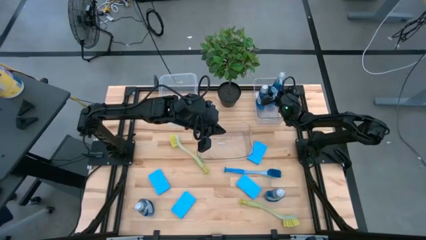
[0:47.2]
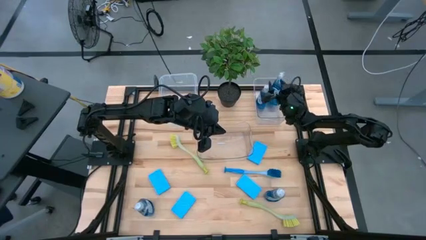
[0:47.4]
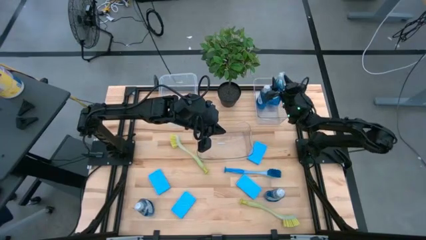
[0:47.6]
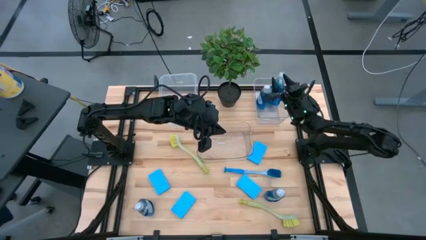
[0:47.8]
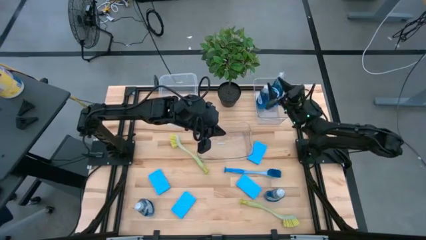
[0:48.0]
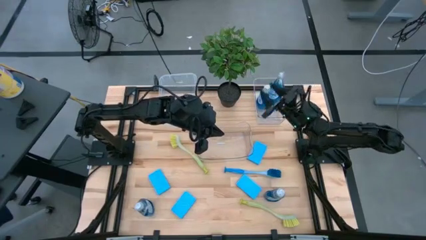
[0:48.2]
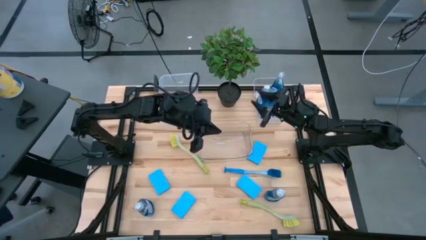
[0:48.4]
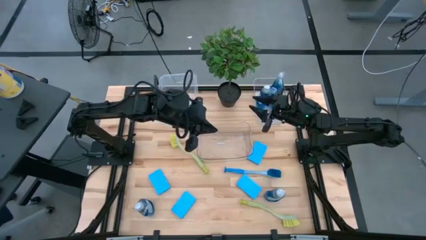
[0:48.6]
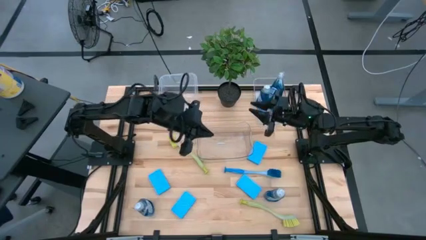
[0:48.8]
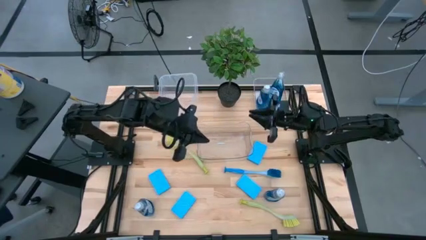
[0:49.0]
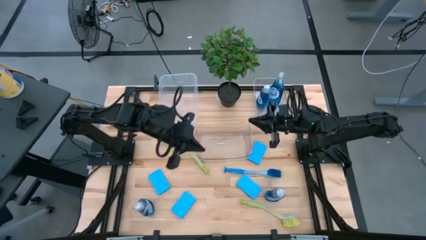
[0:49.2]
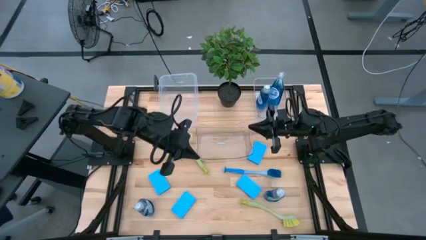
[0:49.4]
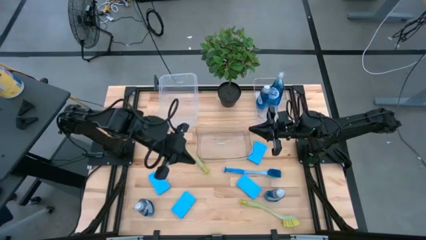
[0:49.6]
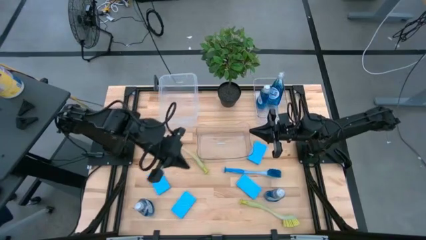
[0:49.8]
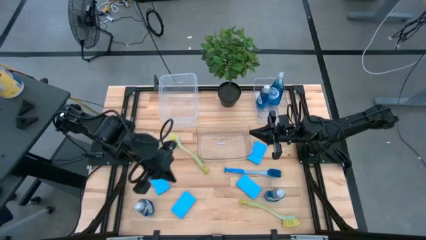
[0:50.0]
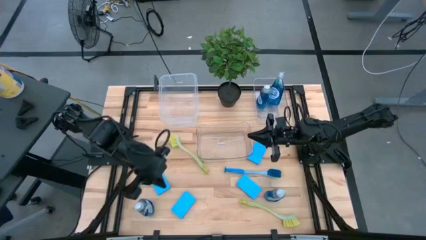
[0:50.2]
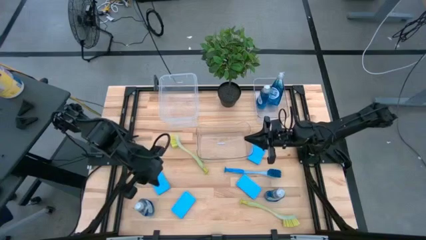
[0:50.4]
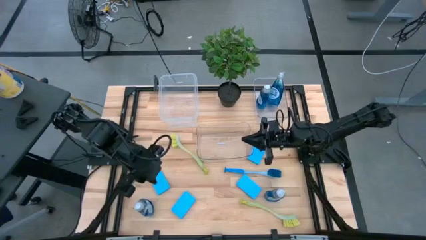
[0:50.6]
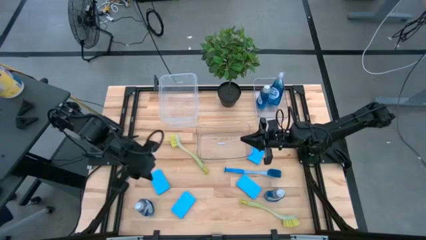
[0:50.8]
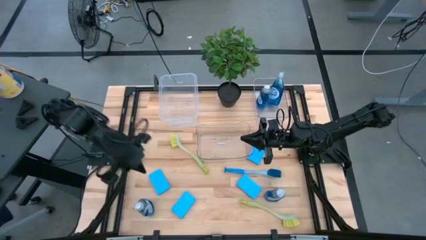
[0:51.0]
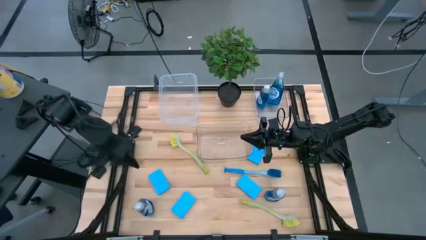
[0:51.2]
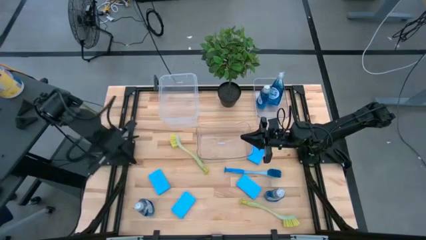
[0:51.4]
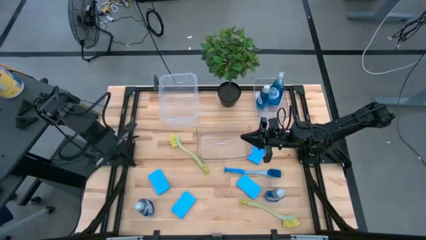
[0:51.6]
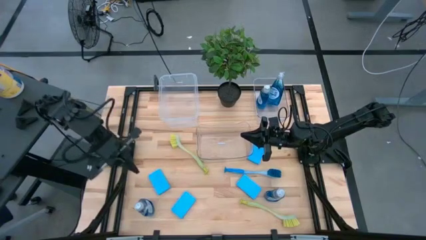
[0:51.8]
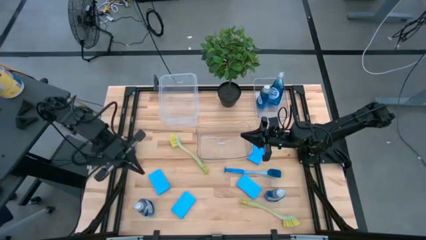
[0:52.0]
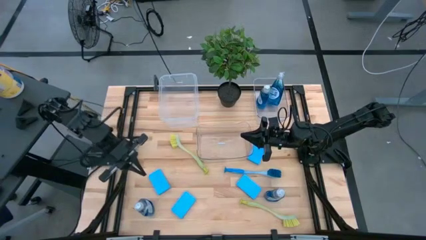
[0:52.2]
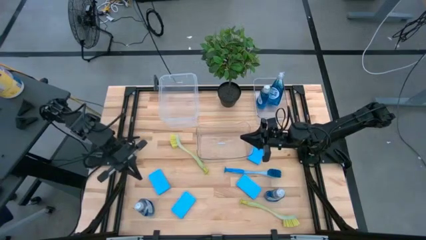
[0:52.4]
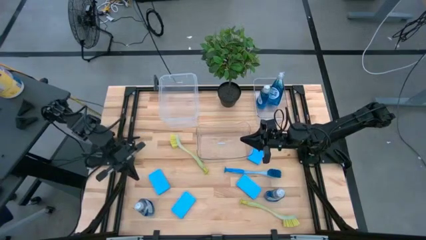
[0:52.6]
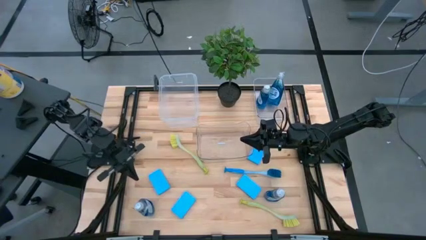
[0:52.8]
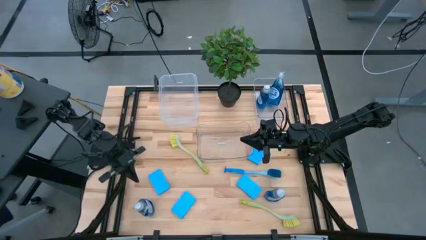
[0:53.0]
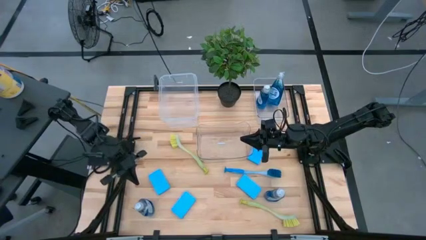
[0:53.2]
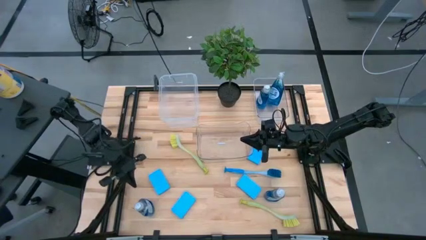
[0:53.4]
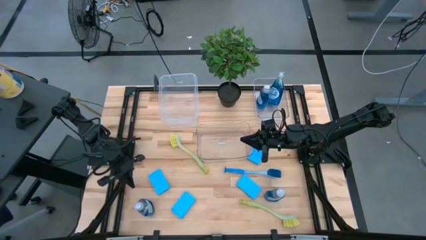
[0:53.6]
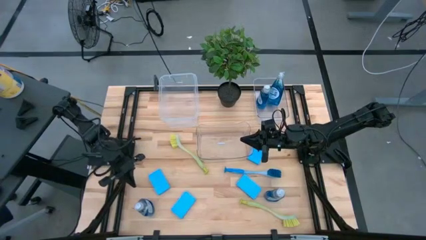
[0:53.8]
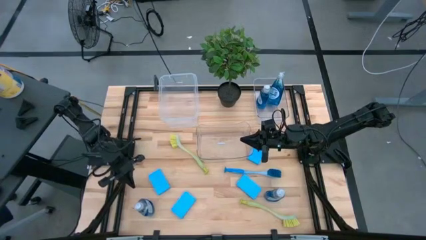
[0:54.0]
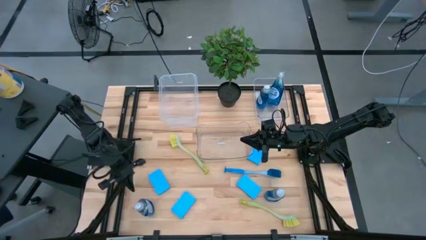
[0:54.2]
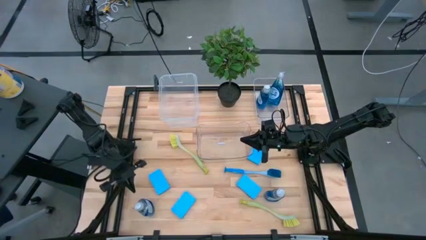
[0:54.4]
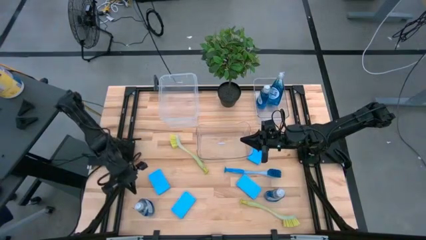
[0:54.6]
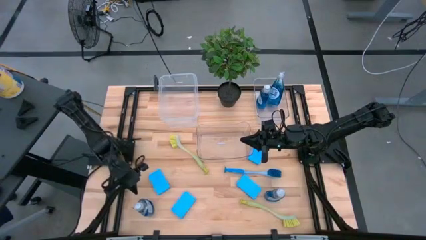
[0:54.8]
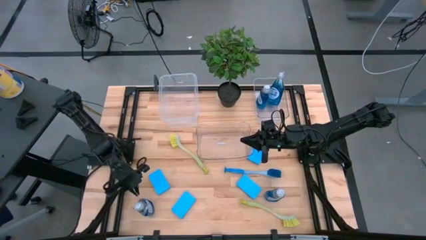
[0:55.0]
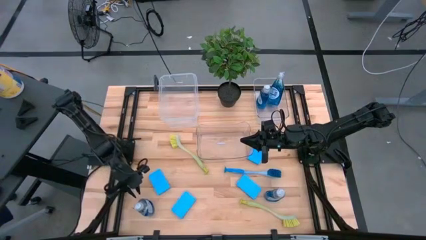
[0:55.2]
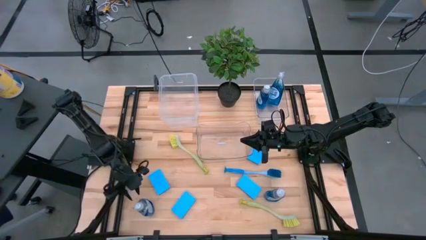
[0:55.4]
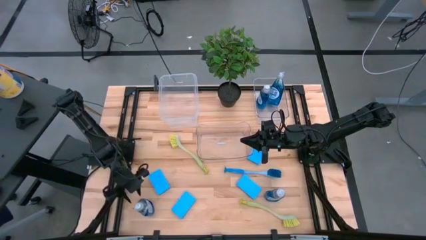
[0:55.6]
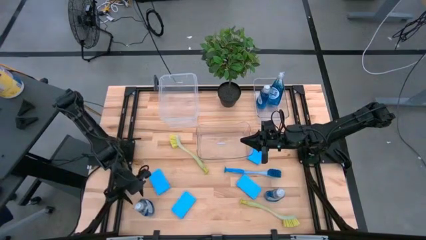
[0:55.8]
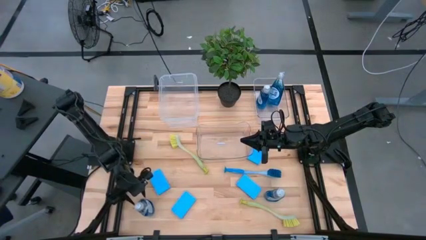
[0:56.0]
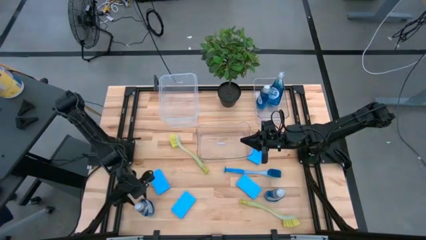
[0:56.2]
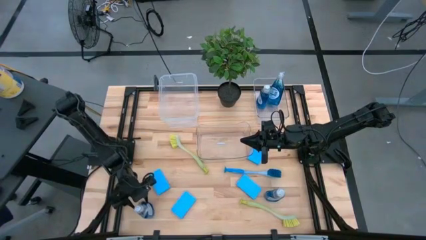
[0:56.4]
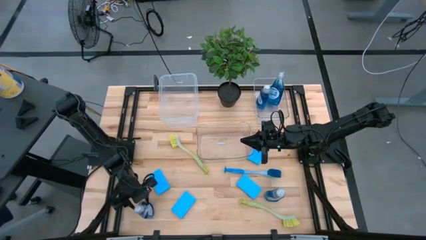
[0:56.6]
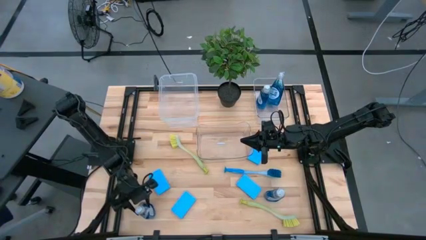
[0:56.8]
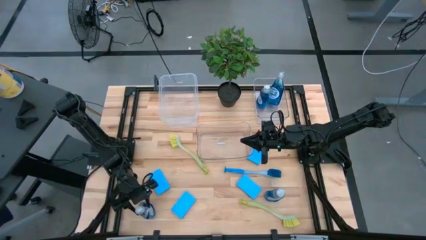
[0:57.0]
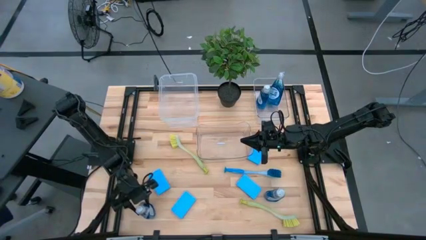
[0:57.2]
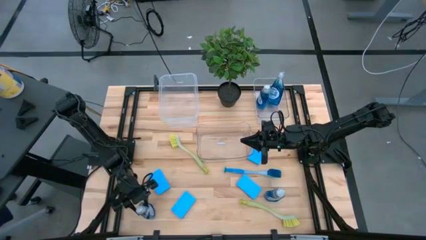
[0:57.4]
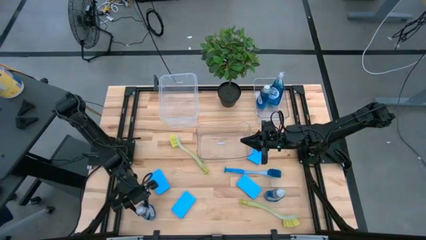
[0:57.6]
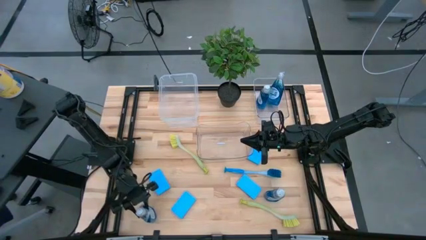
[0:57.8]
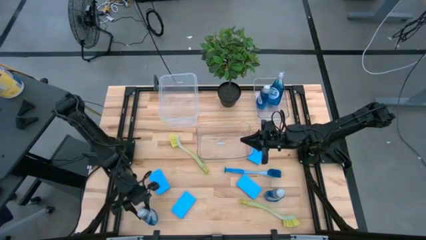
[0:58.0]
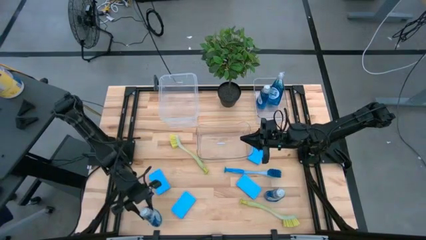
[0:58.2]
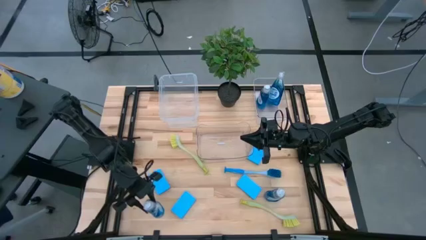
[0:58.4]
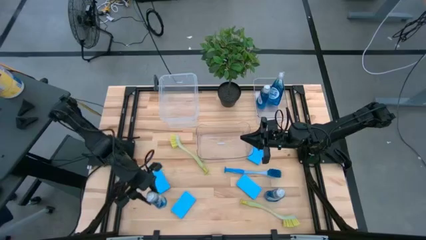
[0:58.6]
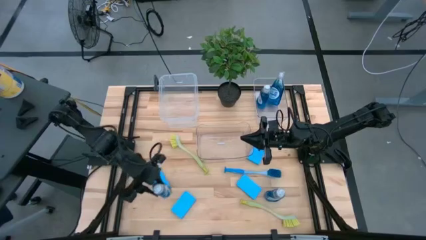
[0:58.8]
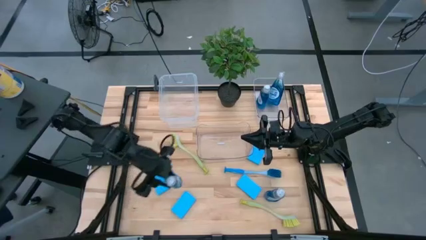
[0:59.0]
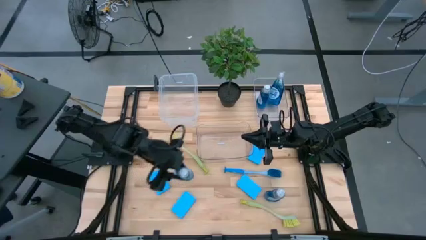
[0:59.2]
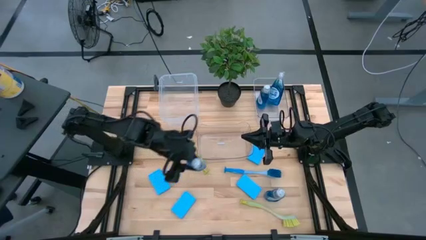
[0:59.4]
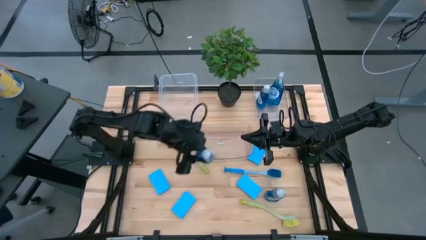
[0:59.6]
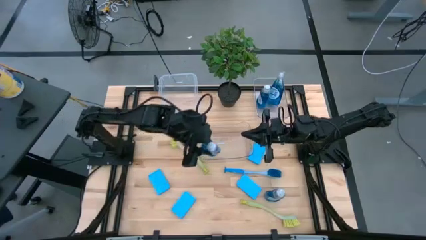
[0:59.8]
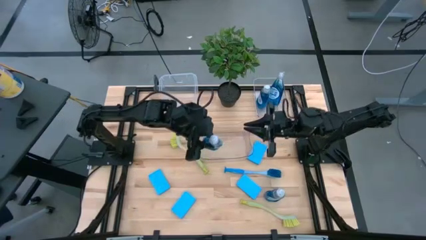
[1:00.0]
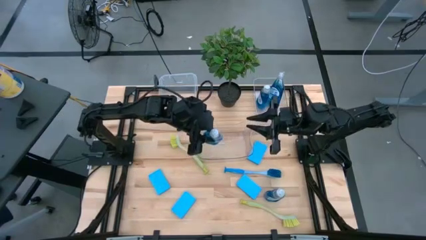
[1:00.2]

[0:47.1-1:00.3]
Task: Pick & Place Kitchen Sink Supplies
Put the dish soap into the top transparent bin

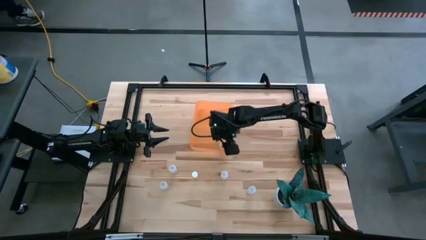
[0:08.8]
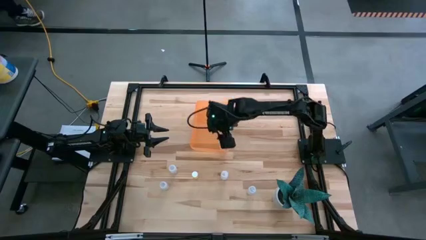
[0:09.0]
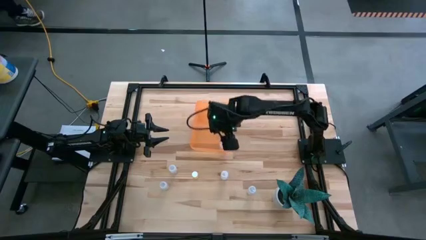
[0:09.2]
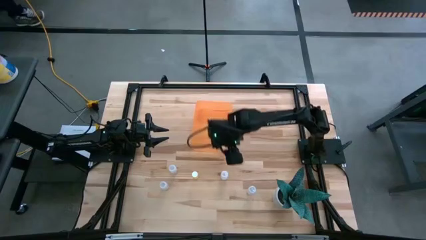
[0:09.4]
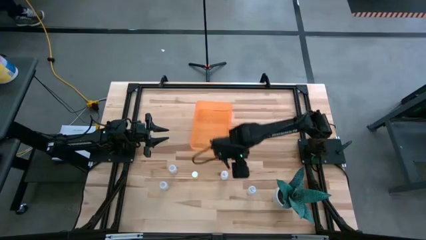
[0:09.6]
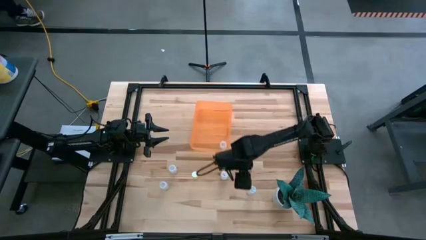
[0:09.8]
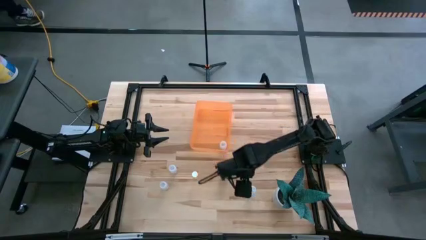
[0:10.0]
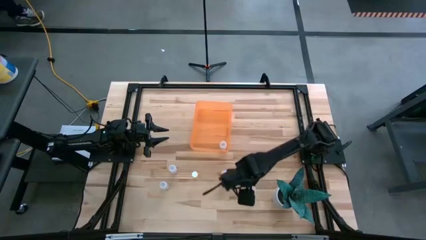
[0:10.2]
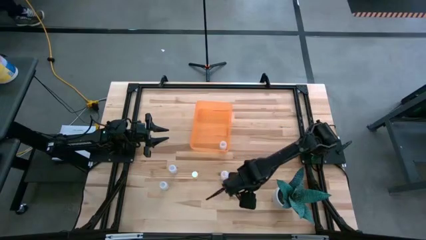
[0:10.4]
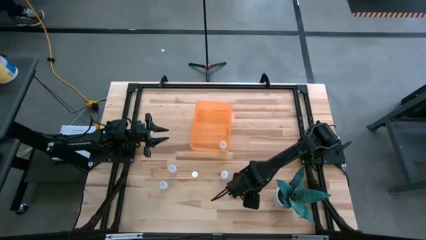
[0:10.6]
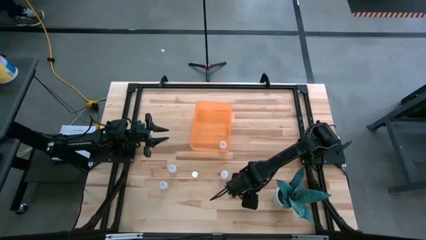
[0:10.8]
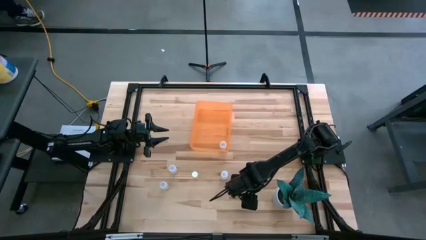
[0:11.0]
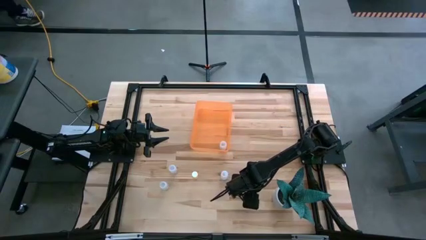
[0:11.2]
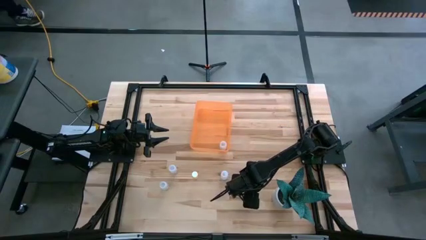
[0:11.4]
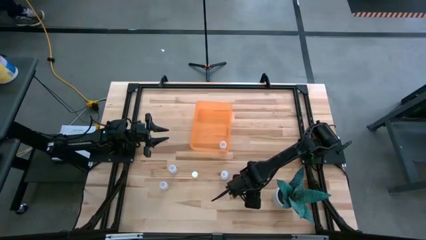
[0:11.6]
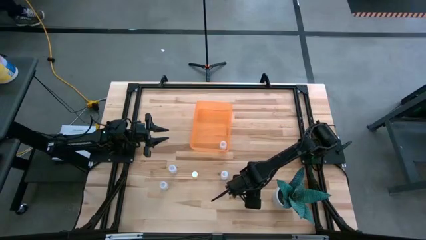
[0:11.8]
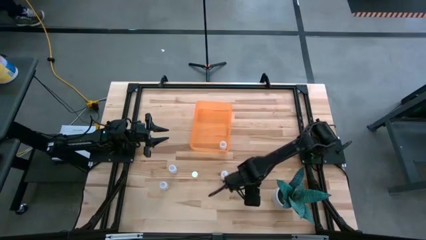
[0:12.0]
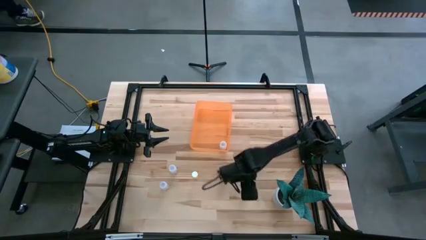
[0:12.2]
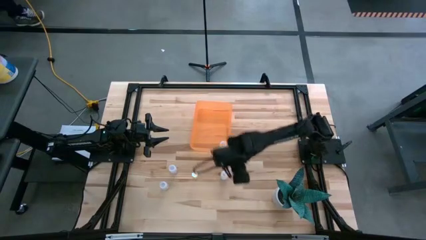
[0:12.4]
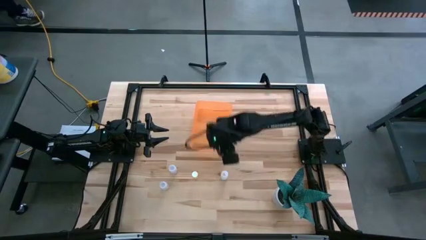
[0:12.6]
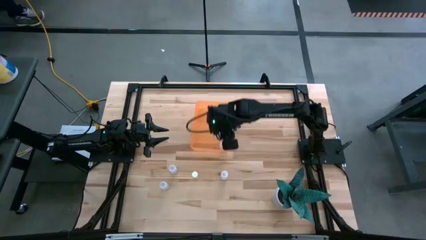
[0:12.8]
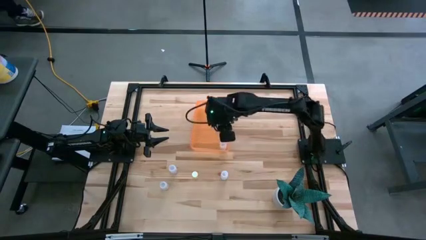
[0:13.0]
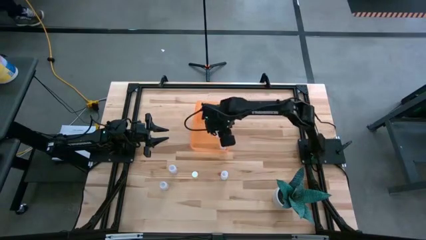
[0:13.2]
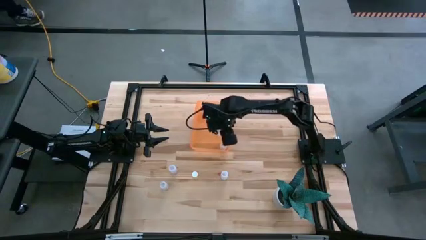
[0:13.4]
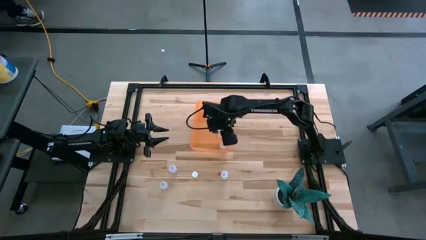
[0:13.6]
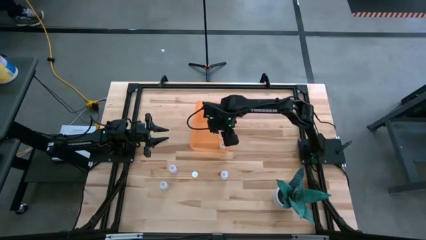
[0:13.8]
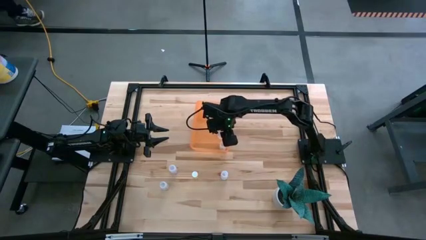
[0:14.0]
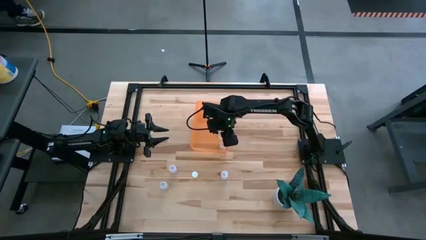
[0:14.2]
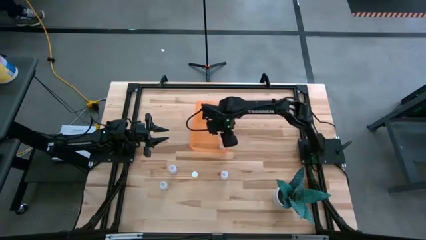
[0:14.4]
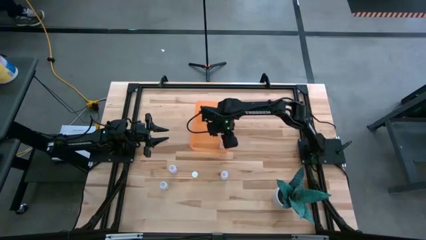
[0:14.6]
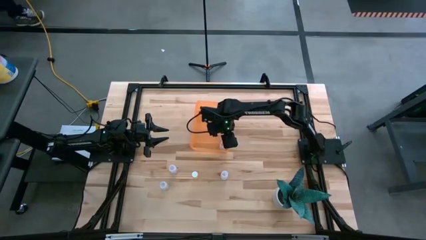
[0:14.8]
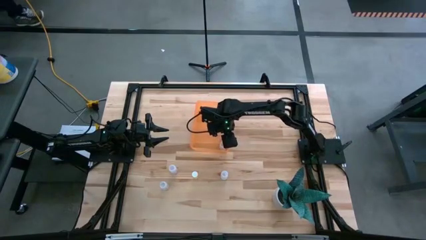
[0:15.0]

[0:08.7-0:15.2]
Task: Pick and place pill bottles into a basket
Put the transparent medicine bottle into the yellow bin
